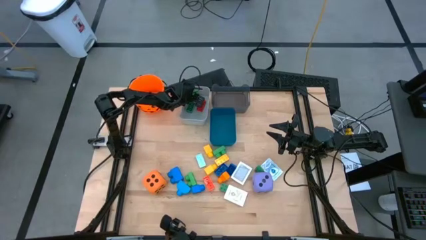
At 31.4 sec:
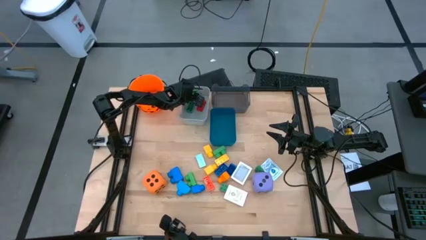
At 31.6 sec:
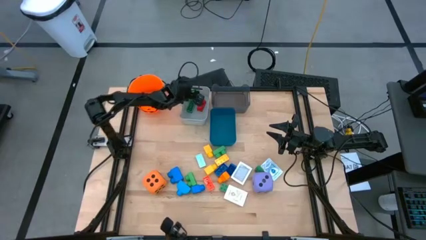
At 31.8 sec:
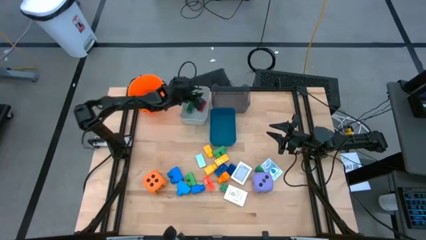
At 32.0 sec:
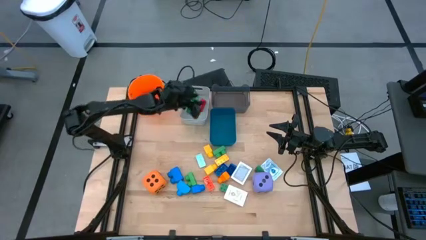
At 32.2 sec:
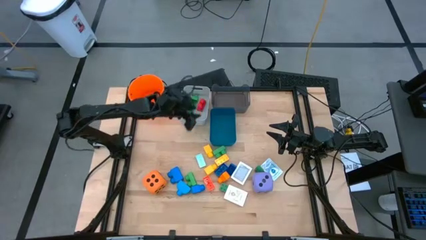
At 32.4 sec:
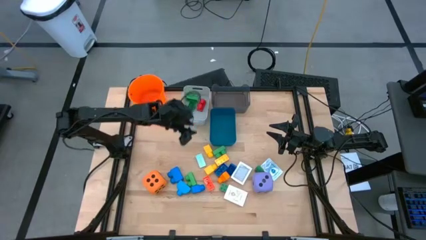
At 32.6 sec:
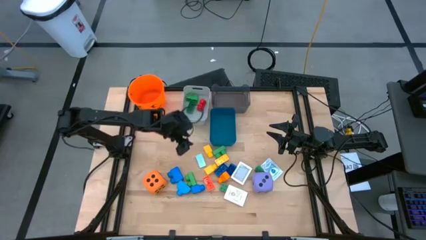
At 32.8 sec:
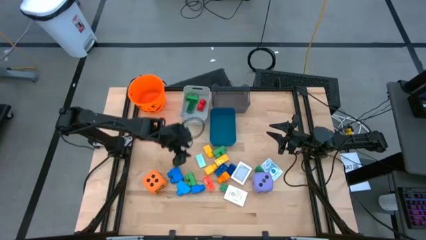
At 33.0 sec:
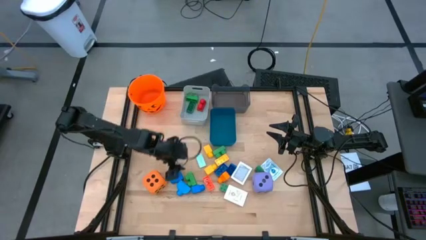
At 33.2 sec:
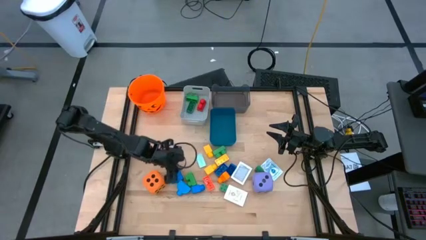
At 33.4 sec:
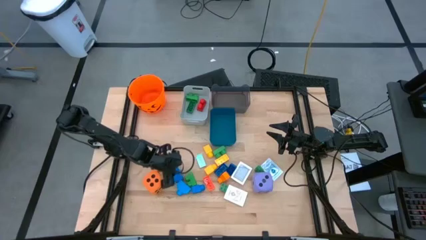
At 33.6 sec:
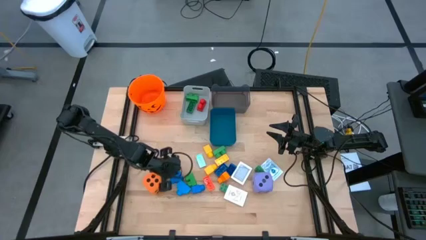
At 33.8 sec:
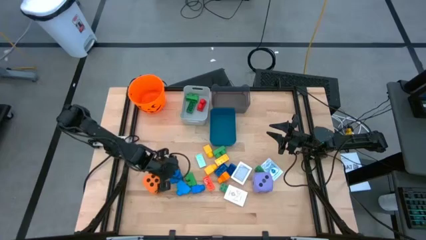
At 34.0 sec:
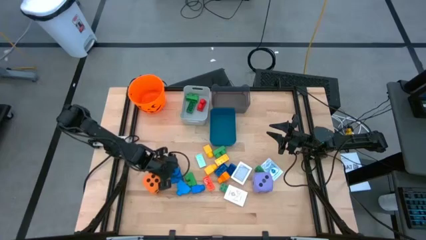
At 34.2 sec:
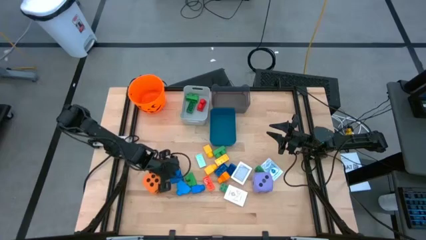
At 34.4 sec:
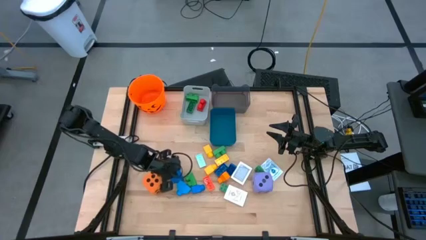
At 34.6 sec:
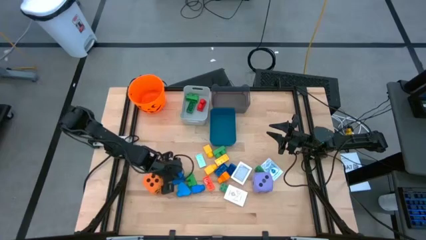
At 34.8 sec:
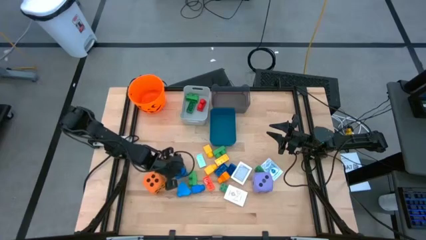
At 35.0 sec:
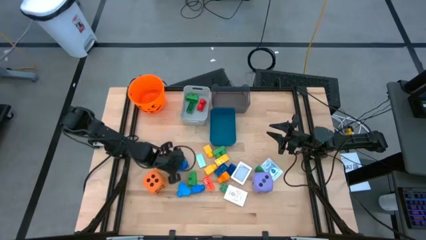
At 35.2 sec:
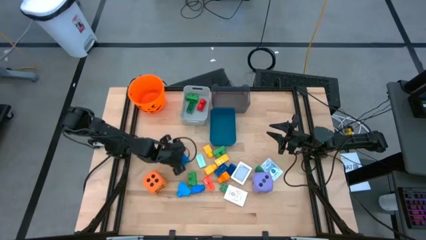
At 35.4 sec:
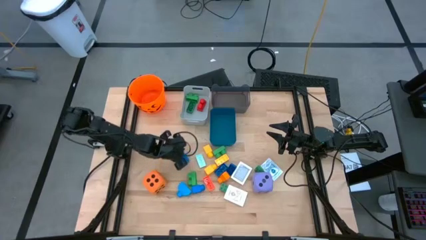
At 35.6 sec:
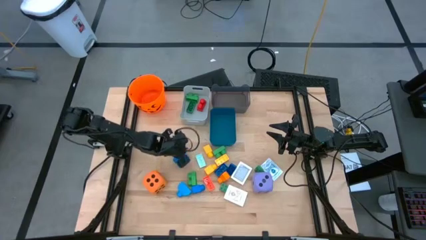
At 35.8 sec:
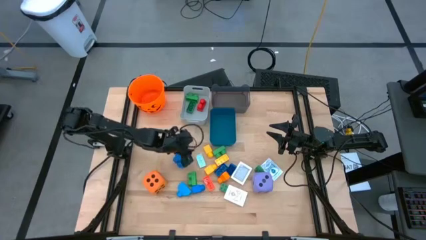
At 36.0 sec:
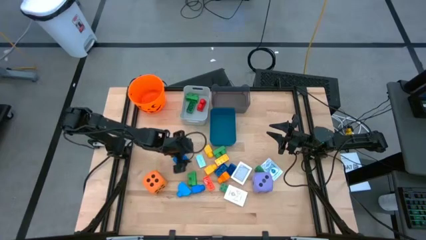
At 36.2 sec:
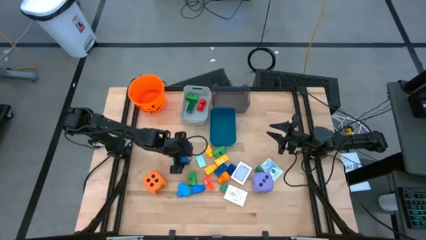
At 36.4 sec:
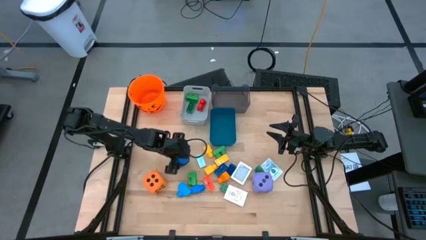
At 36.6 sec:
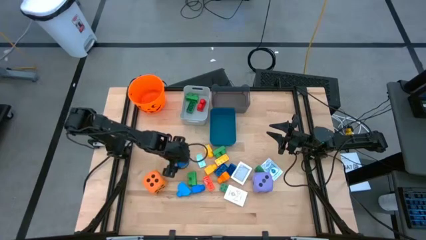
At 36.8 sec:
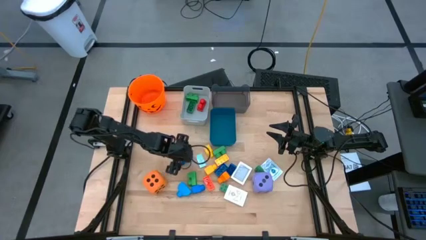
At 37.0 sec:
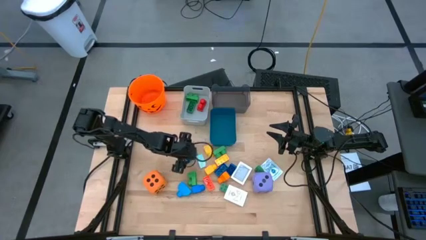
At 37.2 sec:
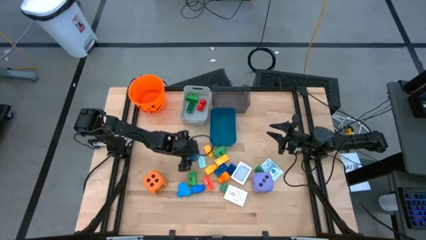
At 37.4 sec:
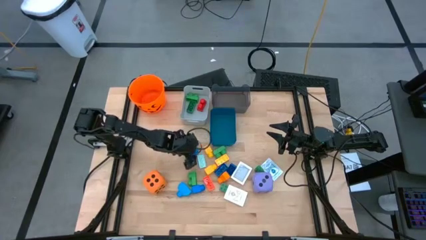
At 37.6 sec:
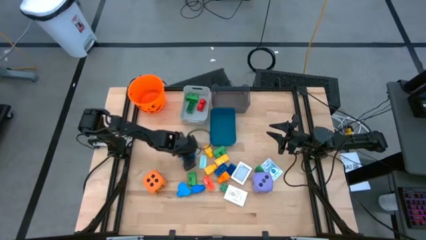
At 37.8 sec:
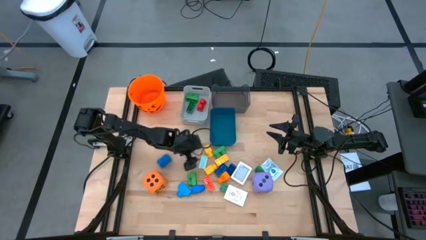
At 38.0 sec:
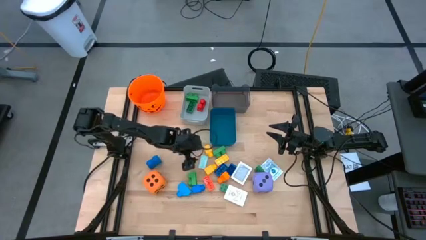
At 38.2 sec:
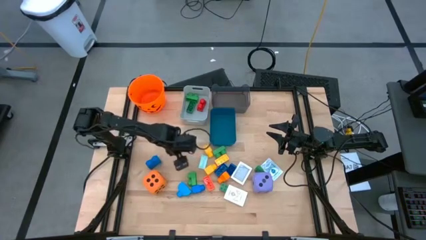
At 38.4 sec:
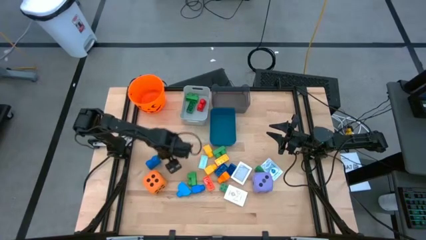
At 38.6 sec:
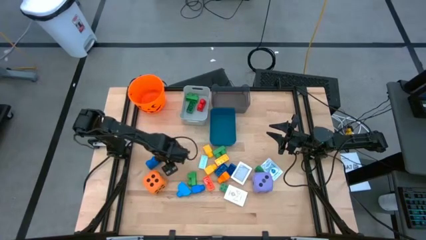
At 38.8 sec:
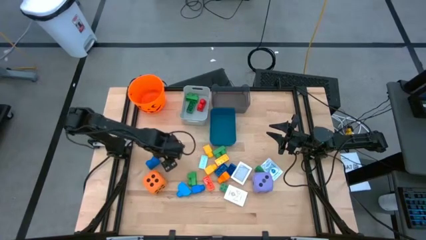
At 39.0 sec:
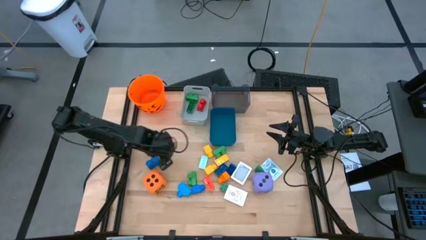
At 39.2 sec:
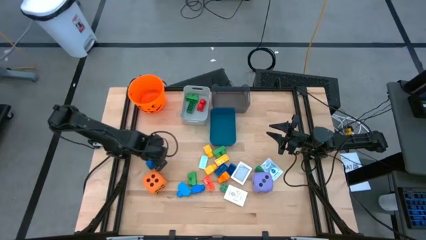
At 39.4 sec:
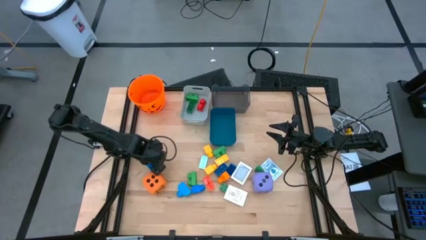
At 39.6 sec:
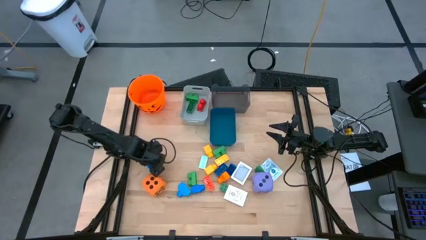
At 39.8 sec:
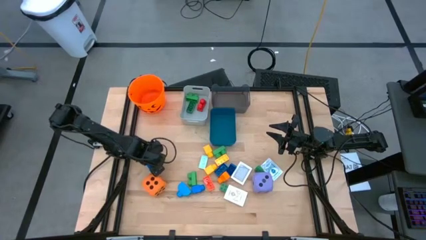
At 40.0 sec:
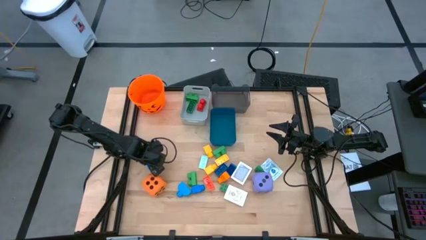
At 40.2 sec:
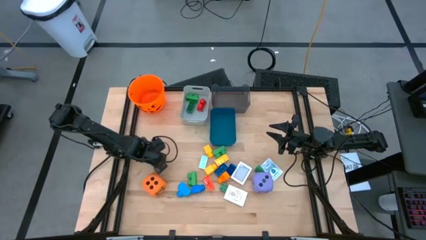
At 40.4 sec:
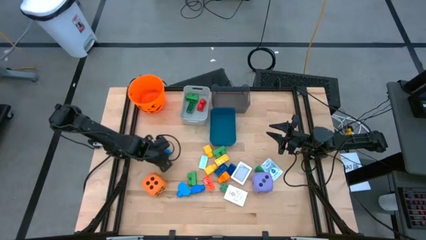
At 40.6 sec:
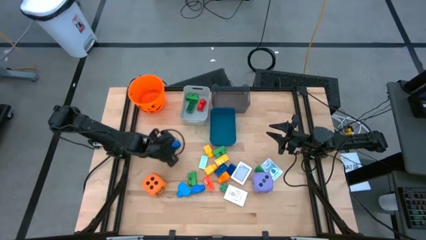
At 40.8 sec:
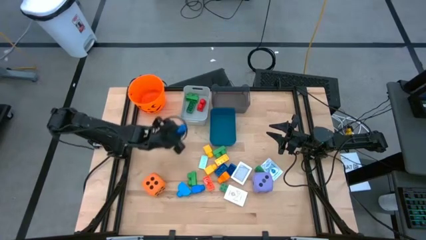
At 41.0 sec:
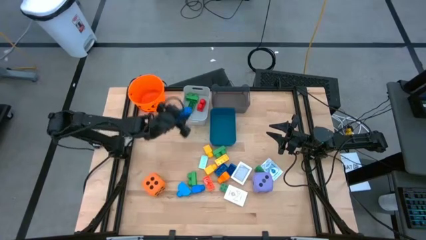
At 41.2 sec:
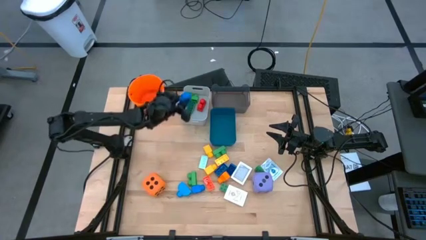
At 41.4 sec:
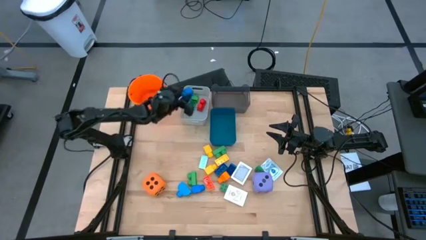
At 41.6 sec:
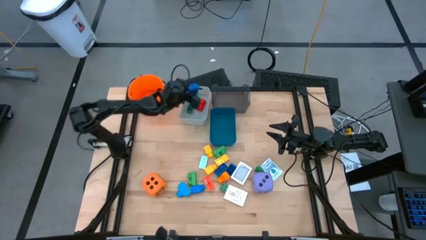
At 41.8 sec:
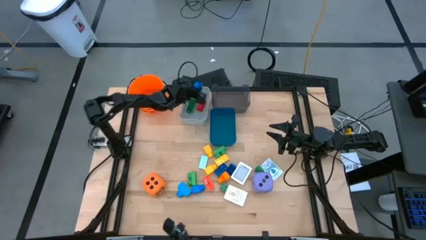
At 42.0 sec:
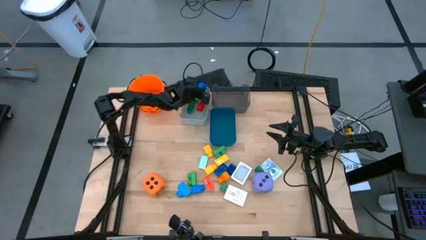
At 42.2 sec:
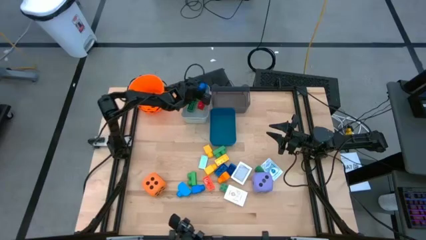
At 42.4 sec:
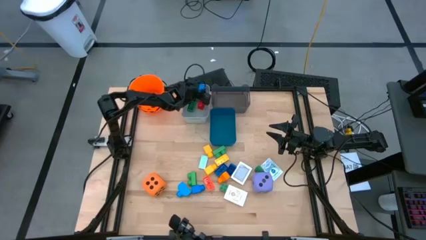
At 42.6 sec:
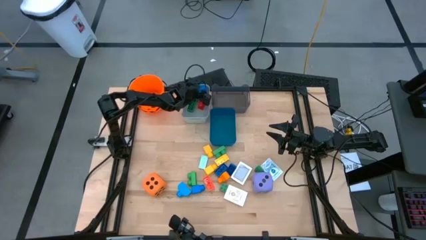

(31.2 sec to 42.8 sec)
Task: Pick & Place Toys
Put the blue 2 stud gamepiece into the white bin

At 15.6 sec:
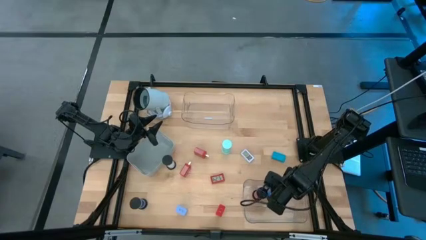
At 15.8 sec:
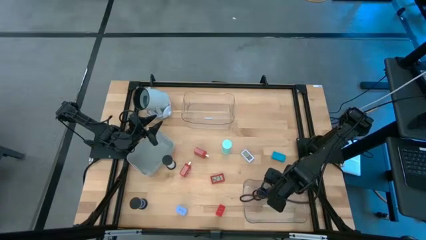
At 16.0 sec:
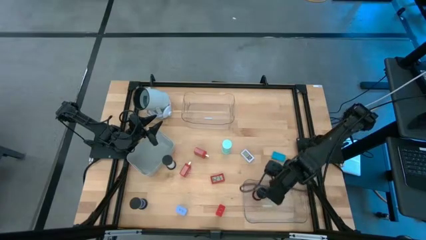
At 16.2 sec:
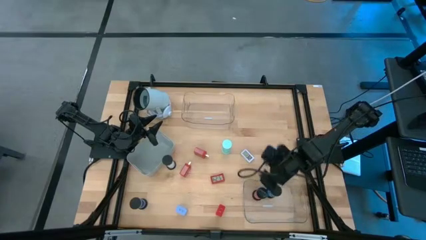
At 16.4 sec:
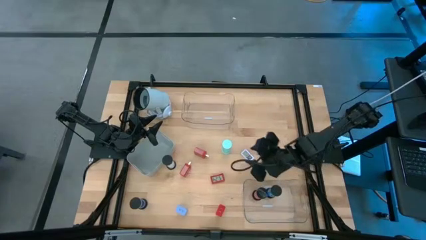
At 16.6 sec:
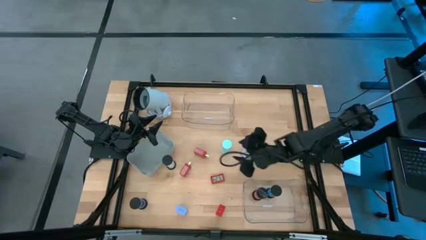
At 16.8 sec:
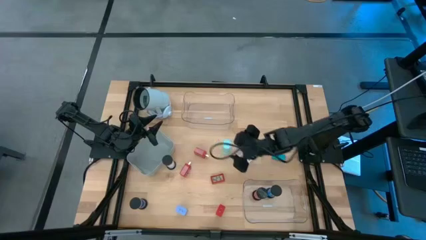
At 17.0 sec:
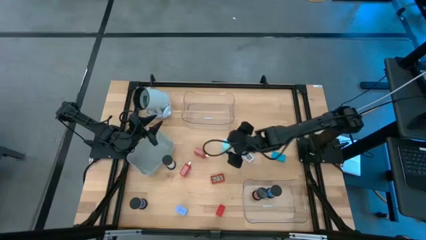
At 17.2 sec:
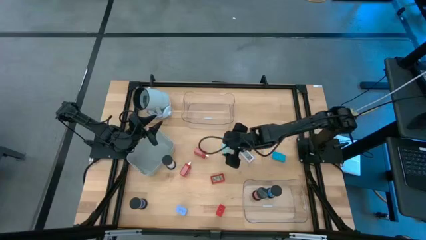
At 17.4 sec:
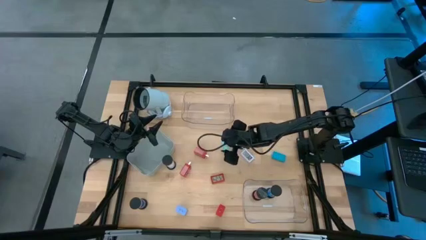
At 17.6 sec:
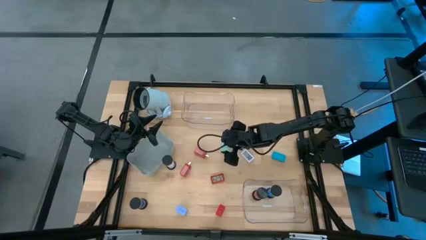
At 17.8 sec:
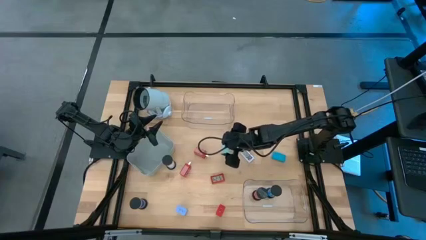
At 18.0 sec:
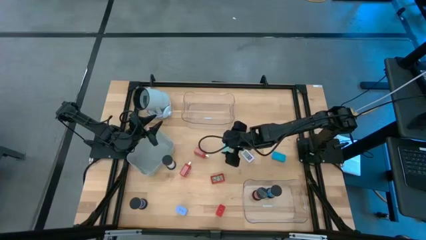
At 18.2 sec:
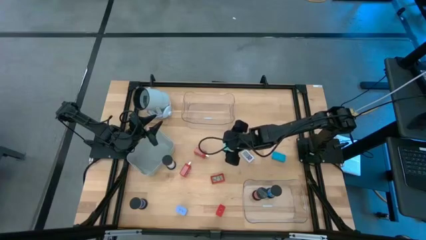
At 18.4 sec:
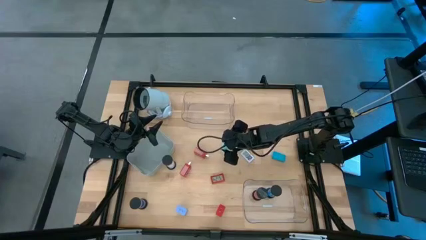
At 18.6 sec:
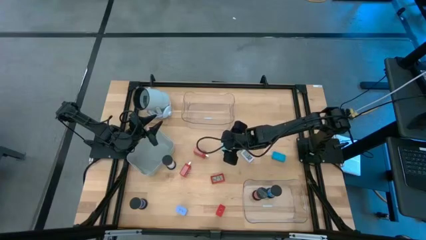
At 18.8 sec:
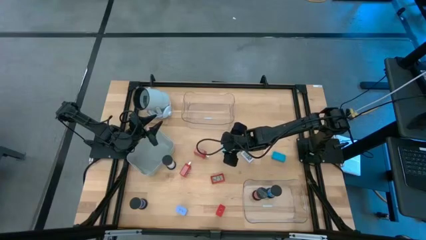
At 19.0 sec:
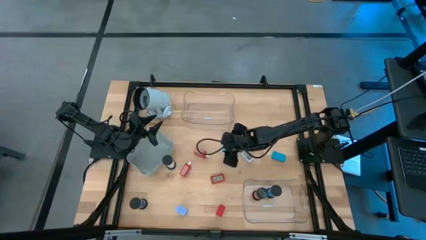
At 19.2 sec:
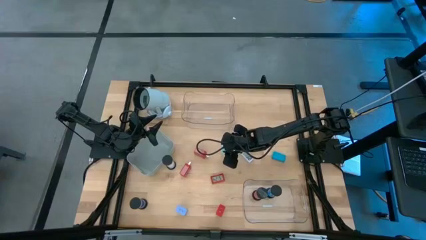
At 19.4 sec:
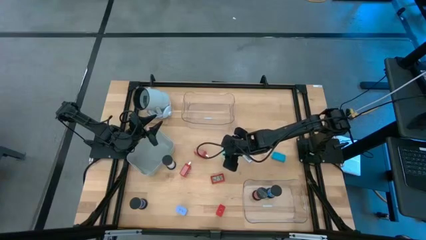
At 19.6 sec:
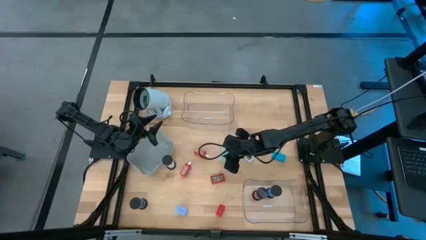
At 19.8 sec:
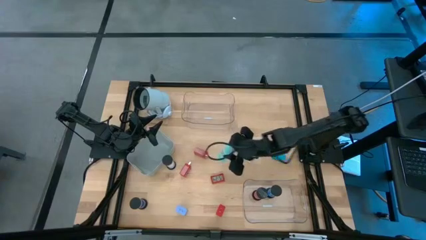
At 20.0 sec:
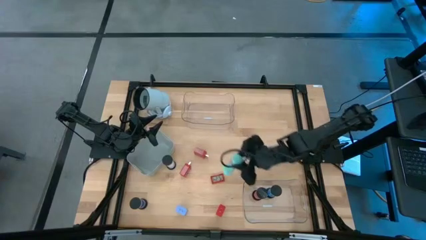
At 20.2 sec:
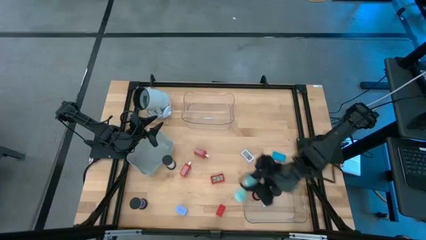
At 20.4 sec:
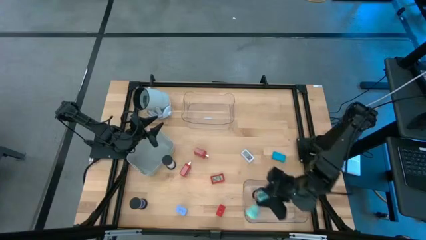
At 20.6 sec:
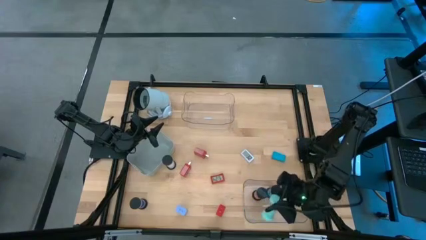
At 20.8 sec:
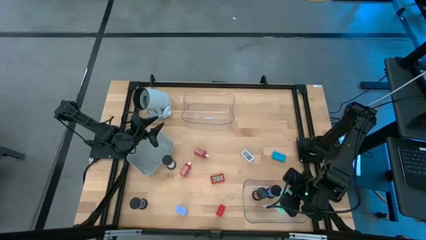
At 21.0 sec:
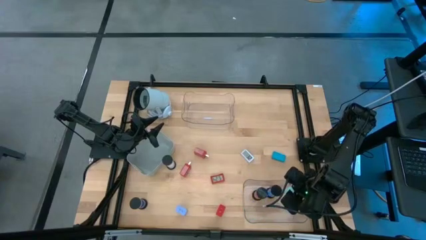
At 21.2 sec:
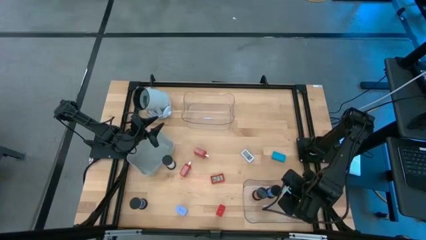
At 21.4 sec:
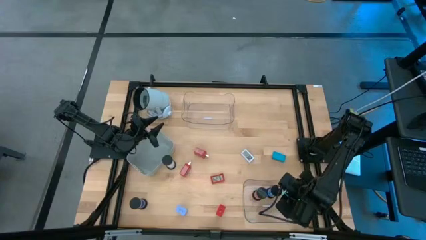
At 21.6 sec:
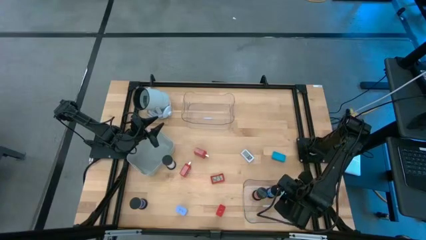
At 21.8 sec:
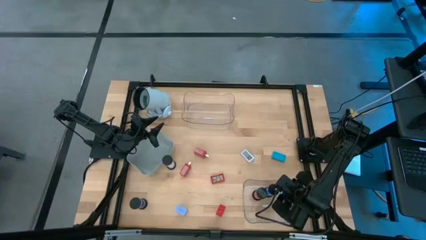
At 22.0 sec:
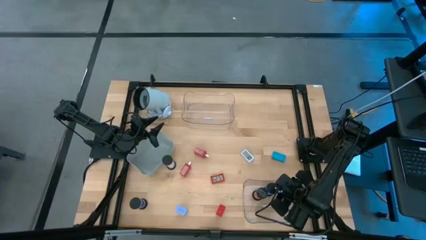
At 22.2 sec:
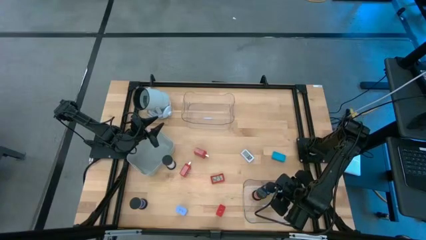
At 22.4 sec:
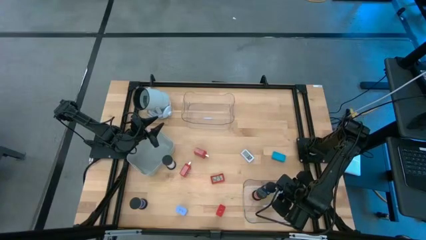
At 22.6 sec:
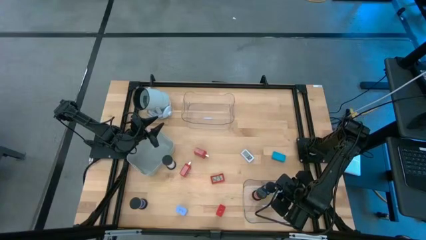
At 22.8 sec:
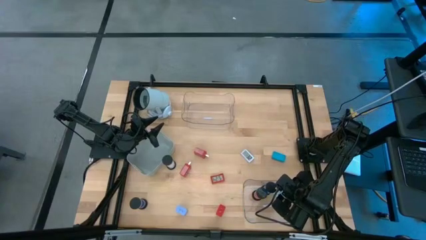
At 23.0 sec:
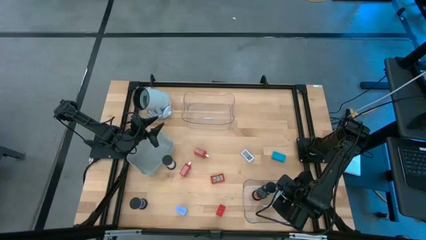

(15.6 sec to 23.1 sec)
Task: Pick & Place Office items
Put the light green hourglass into the bottom transparent bin
